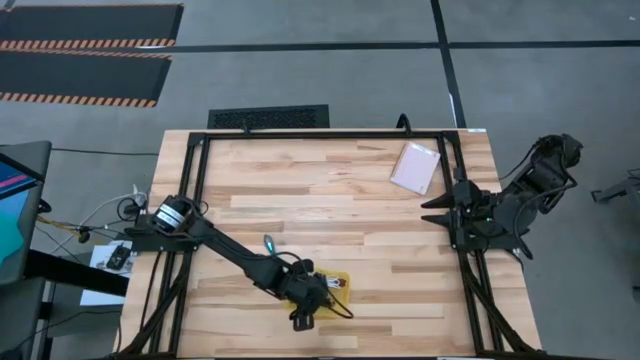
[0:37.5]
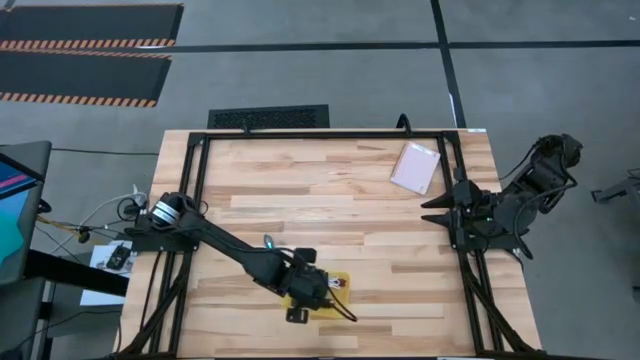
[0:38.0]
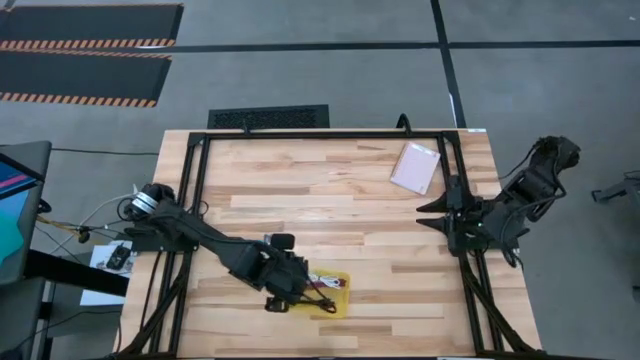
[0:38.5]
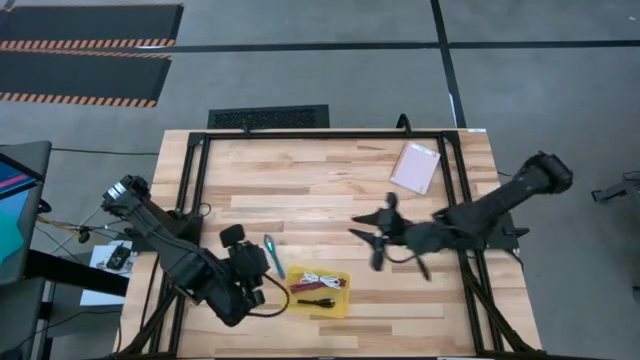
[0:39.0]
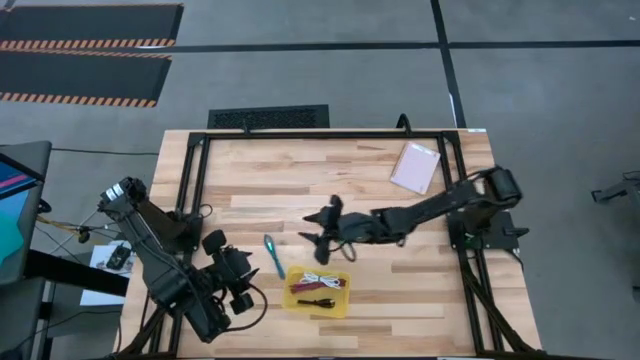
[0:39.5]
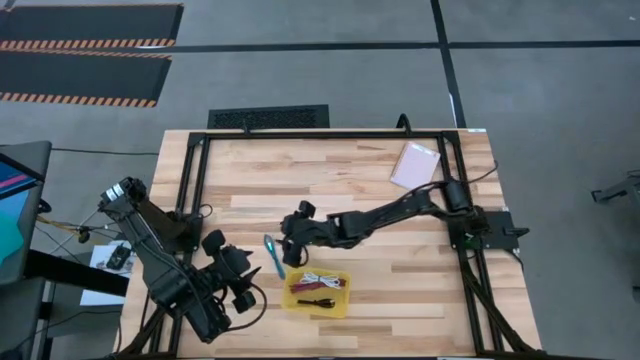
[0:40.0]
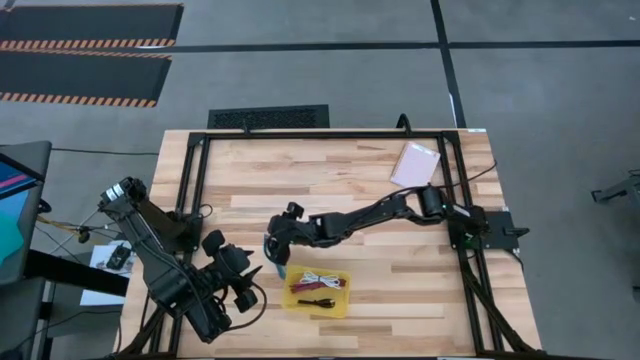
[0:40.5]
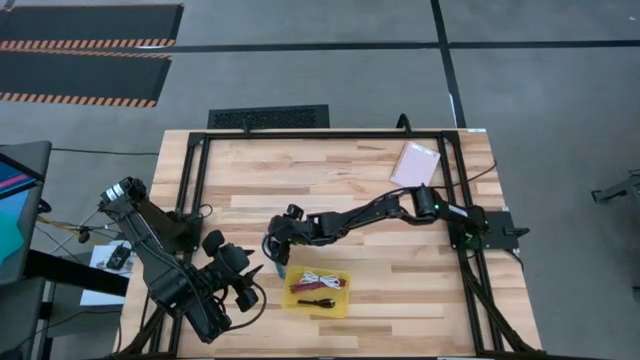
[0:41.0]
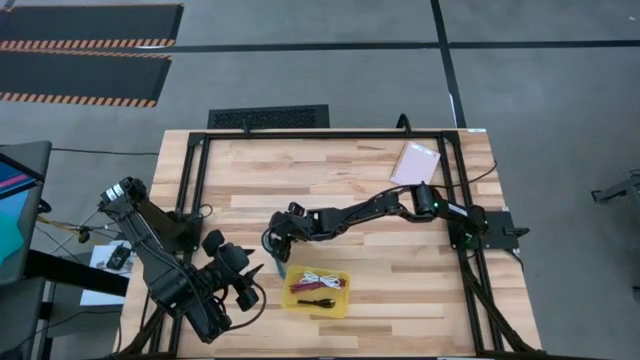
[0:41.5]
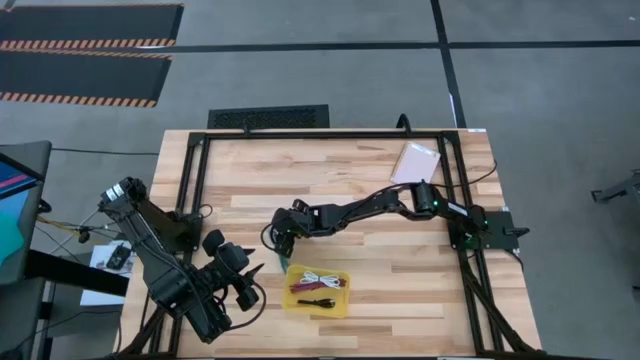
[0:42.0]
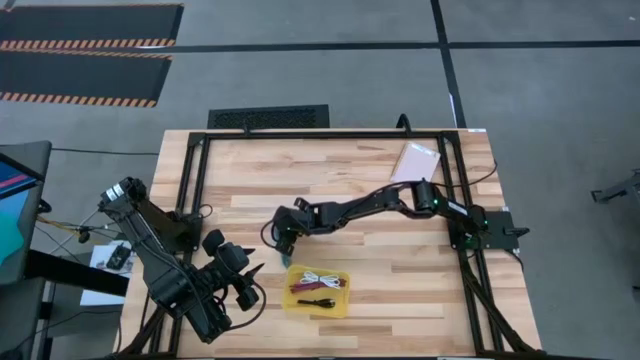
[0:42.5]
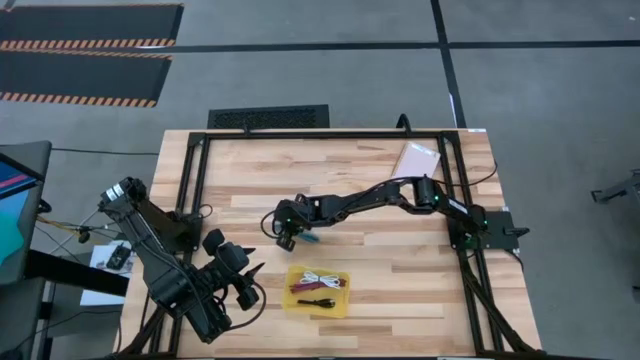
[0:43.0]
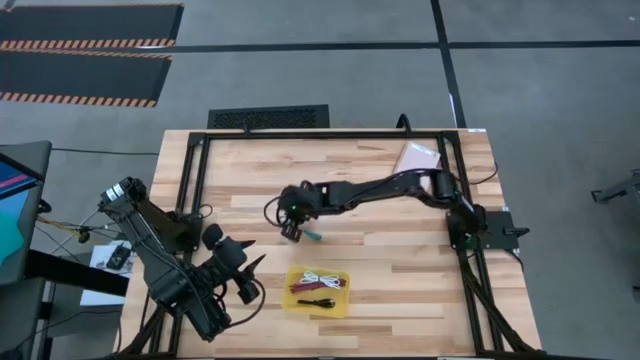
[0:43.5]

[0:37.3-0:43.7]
Task: Pick and place USB-C Cables
Put the blue charger cable into the yellow bin

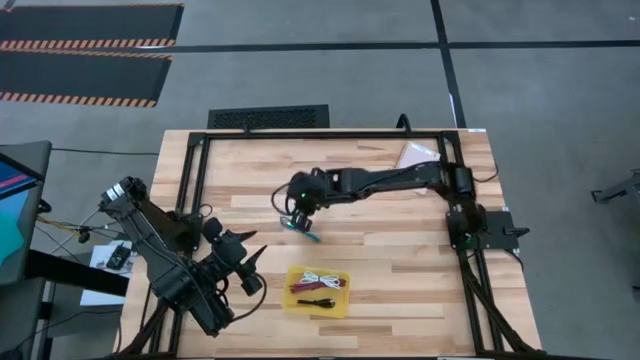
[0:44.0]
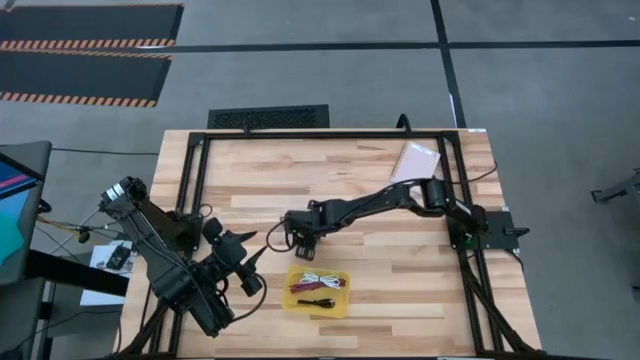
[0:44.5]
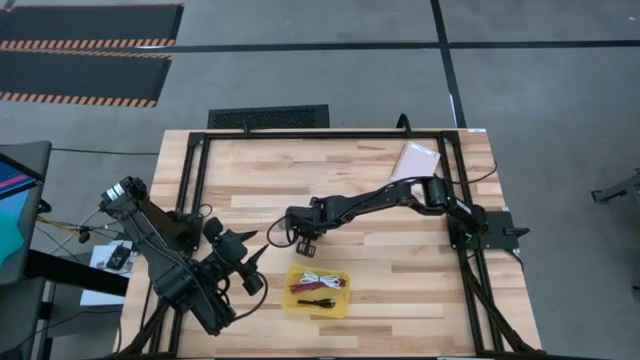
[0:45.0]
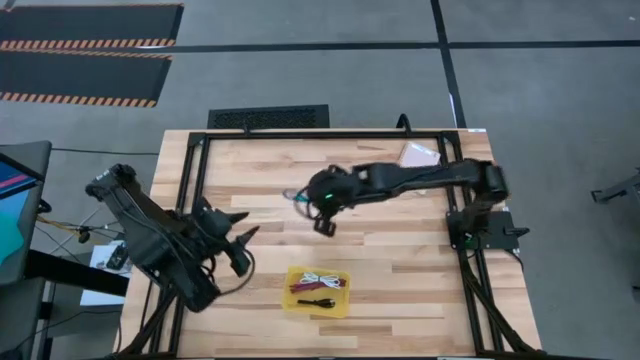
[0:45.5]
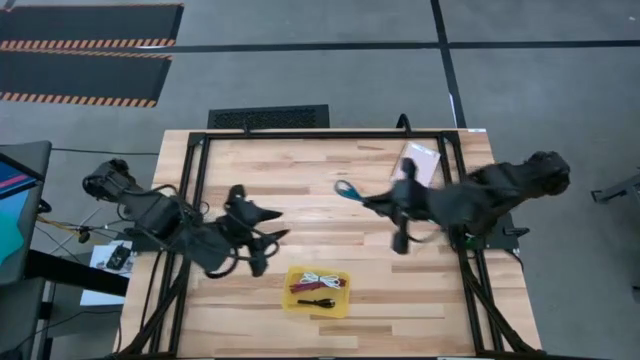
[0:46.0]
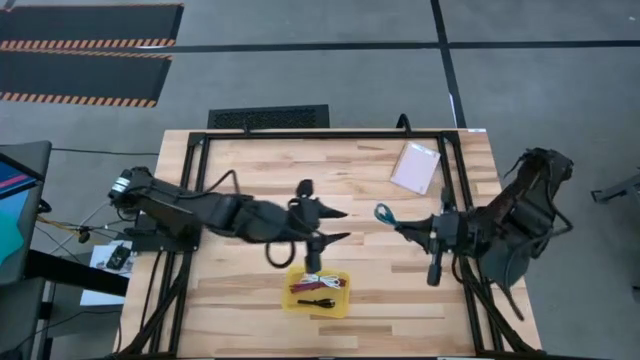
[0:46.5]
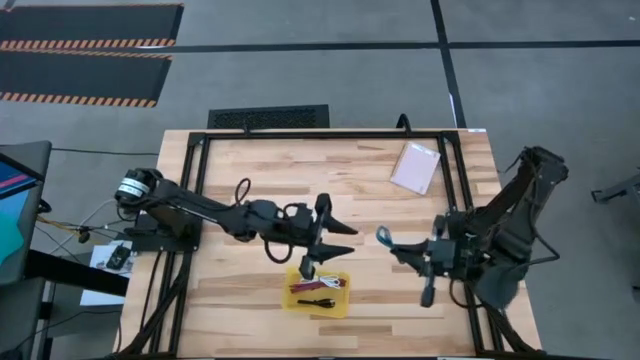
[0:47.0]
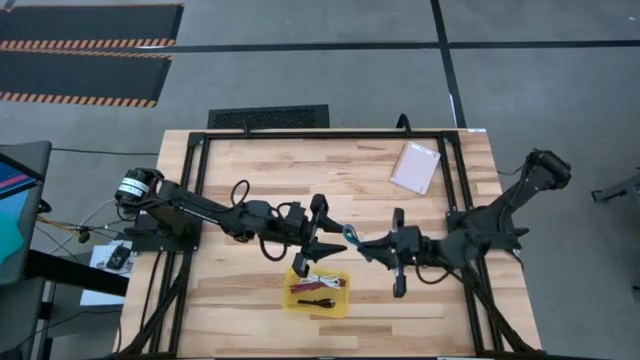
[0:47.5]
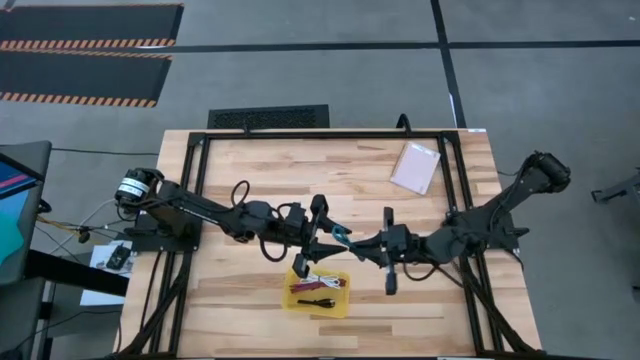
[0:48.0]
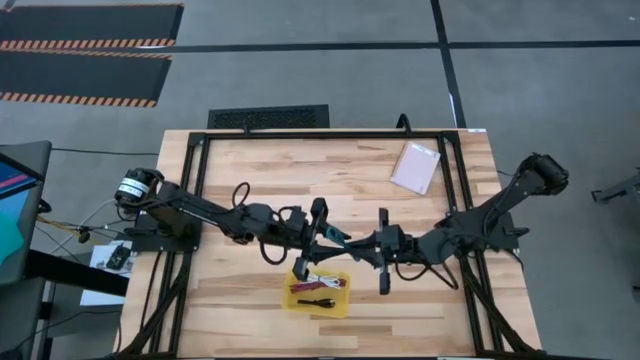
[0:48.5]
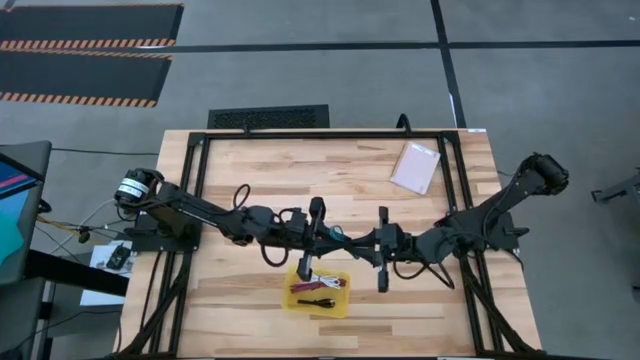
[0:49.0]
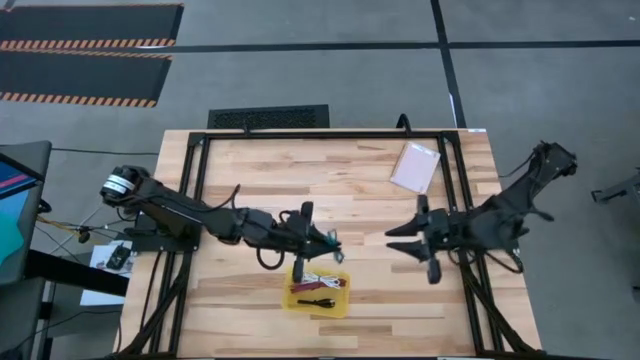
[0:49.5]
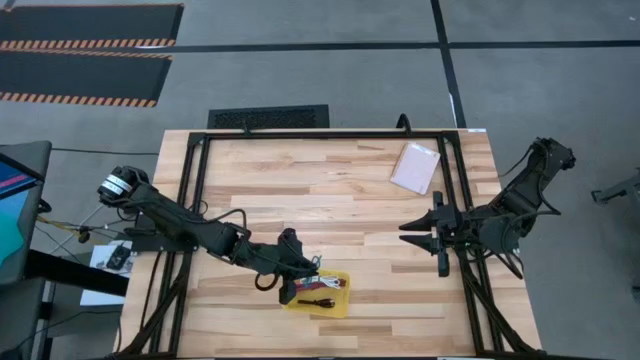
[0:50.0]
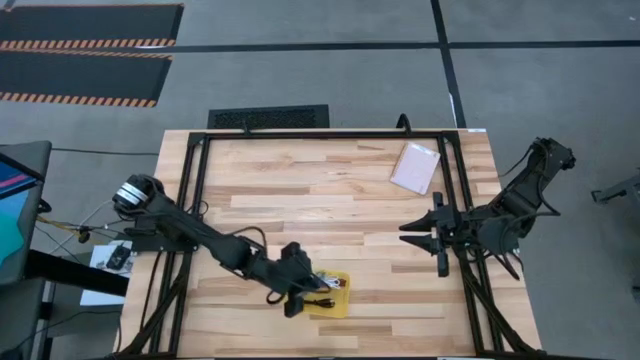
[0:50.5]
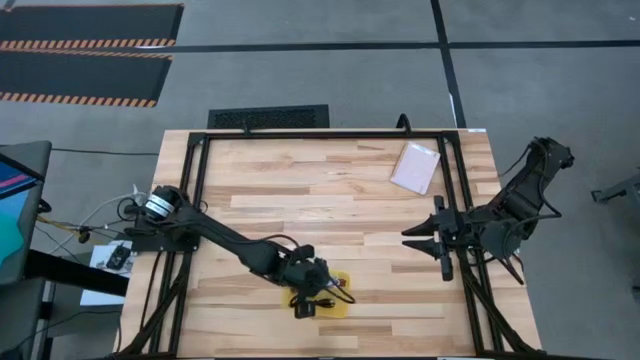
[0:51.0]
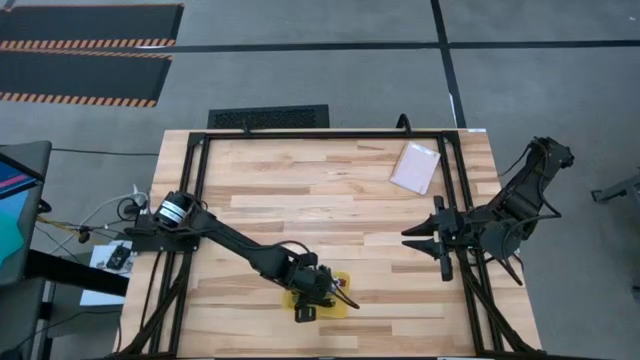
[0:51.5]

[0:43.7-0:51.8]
Put the blue charger cable into the yellow bin

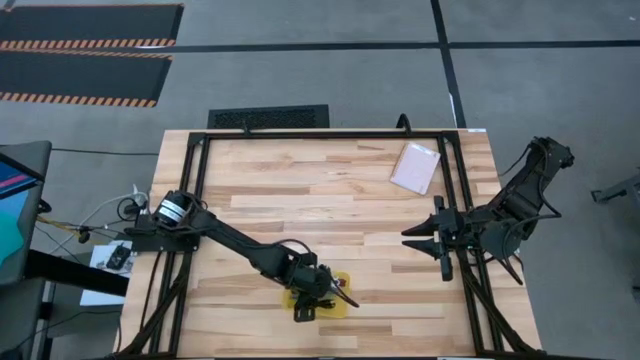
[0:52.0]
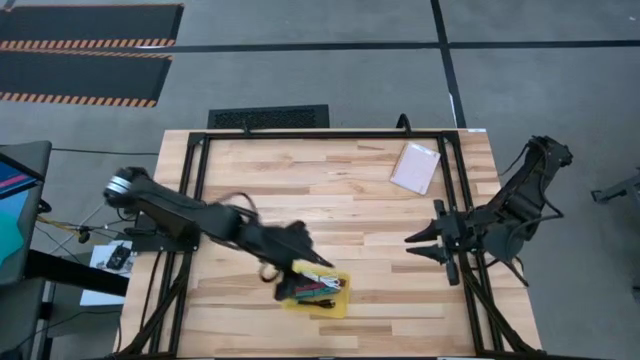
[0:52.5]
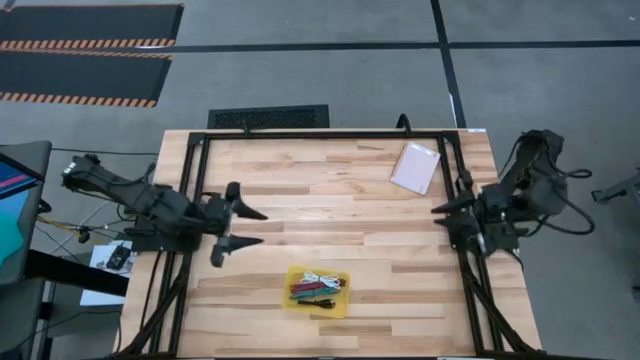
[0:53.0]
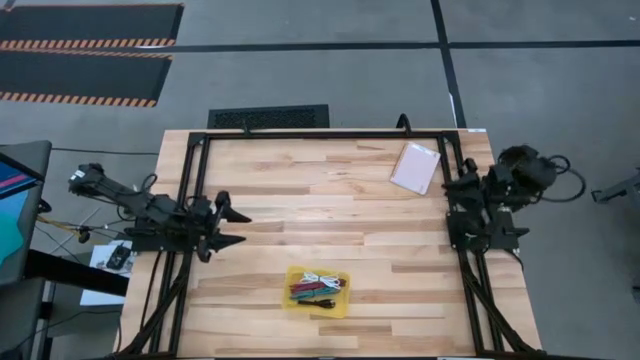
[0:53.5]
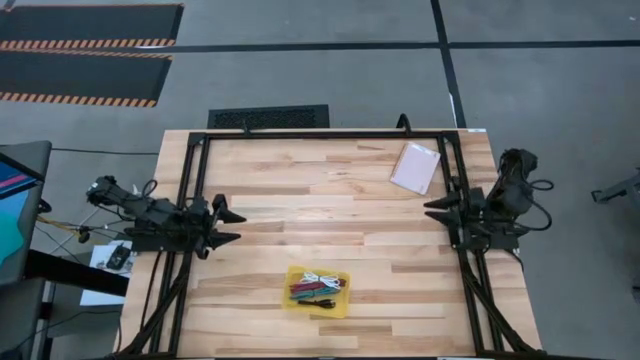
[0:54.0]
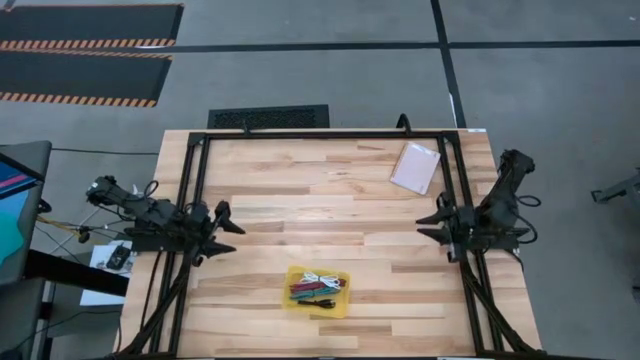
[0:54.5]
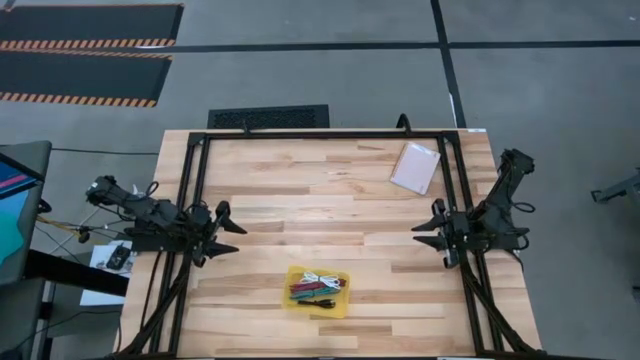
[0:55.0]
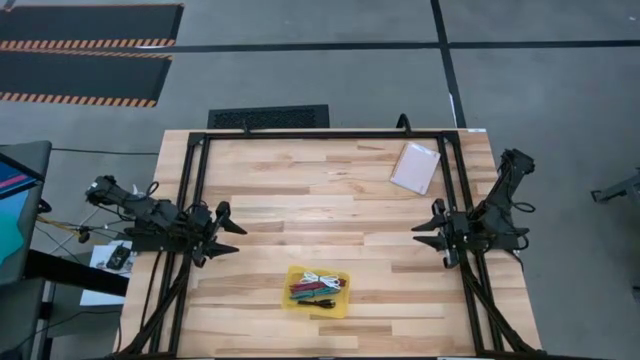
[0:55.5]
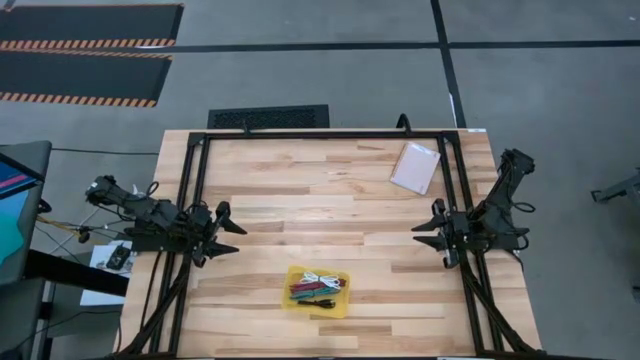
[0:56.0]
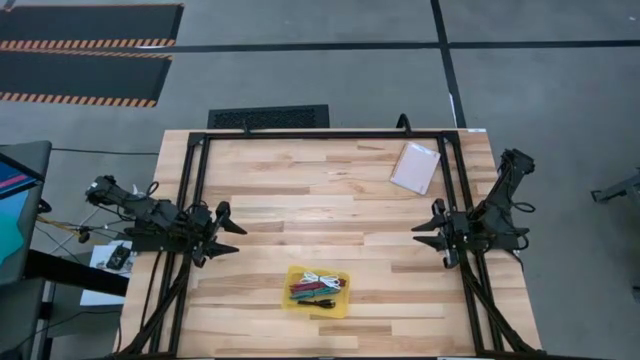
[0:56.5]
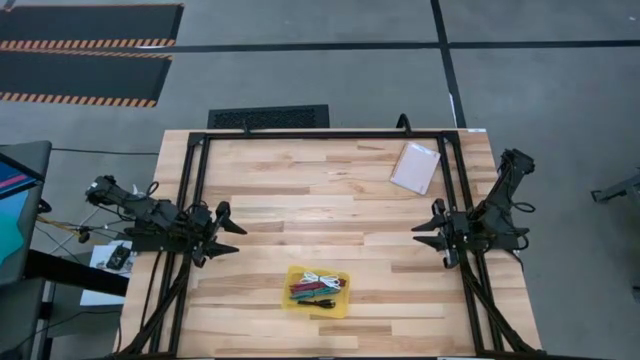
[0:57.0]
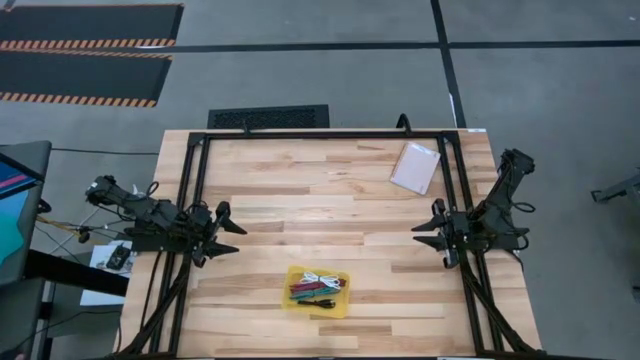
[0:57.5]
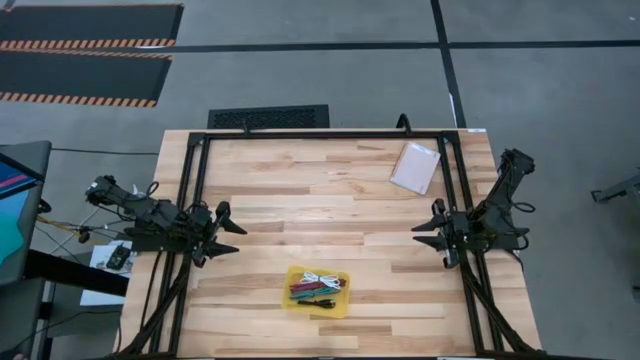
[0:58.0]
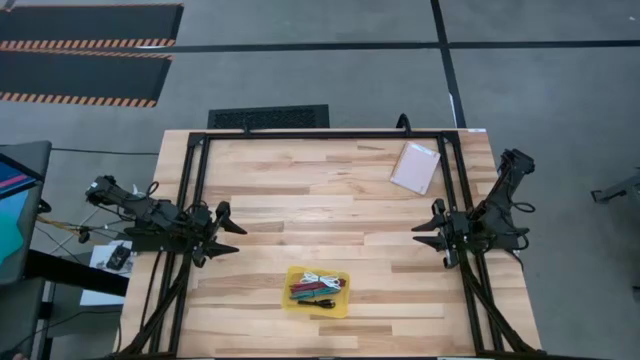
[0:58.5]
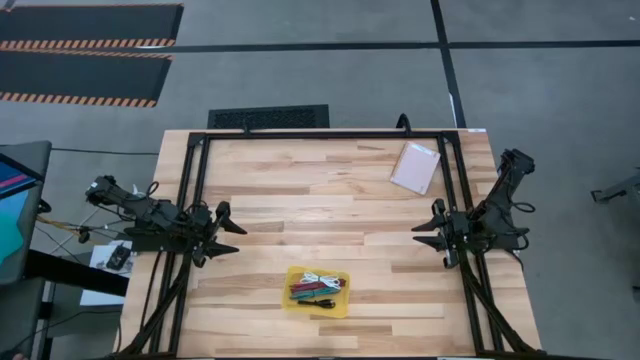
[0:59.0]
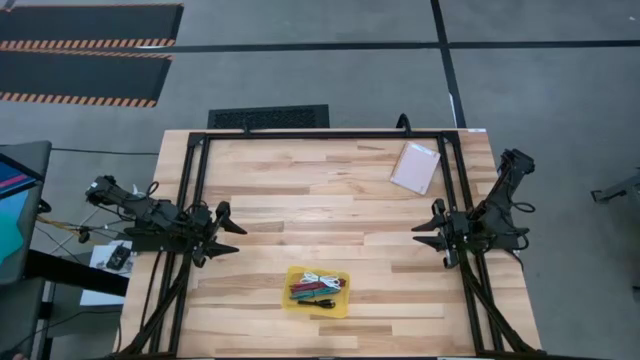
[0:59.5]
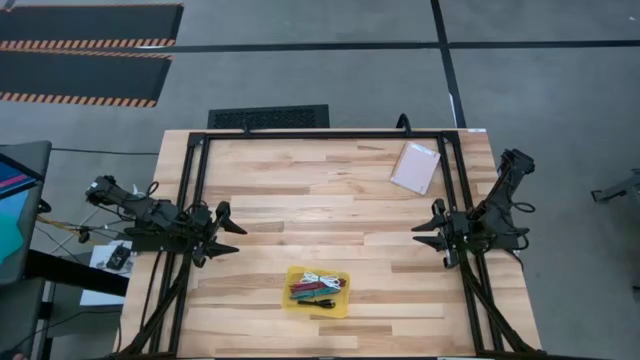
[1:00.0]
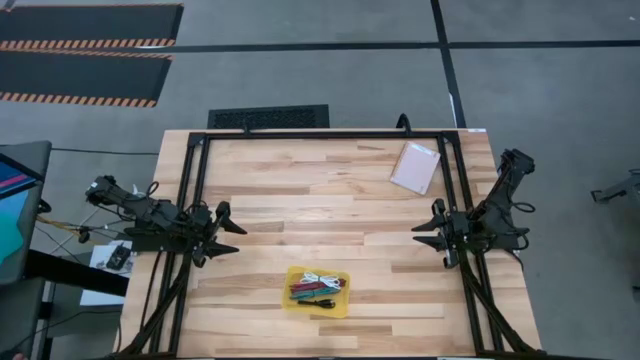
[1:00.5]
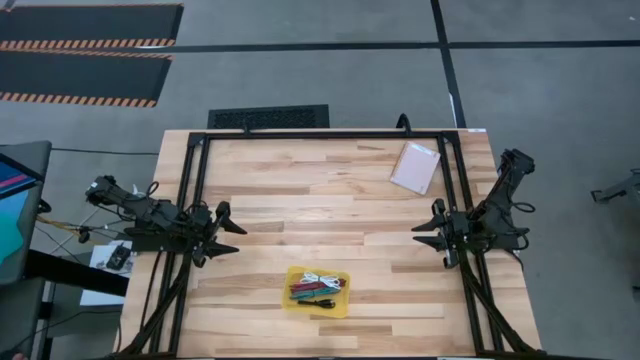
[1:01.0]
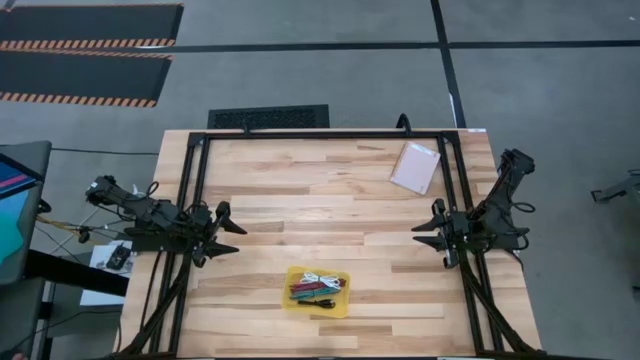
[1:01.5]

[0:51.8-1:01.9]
Return to Home Position
